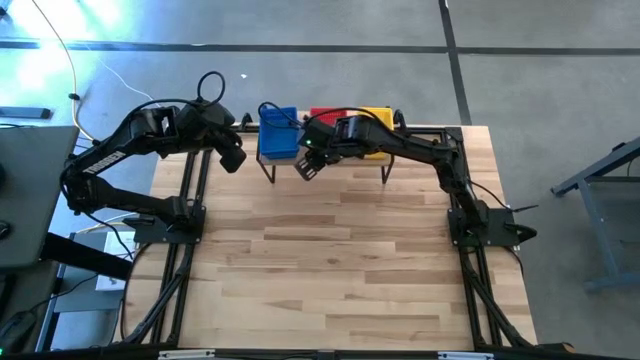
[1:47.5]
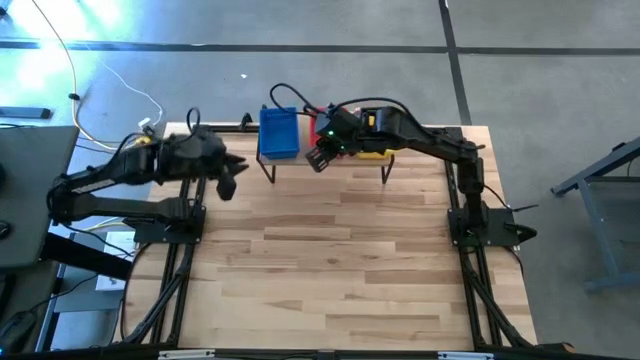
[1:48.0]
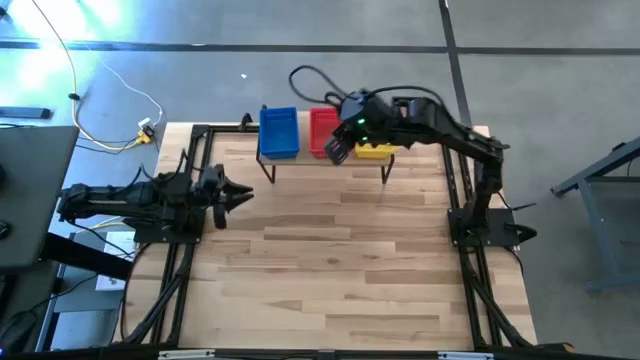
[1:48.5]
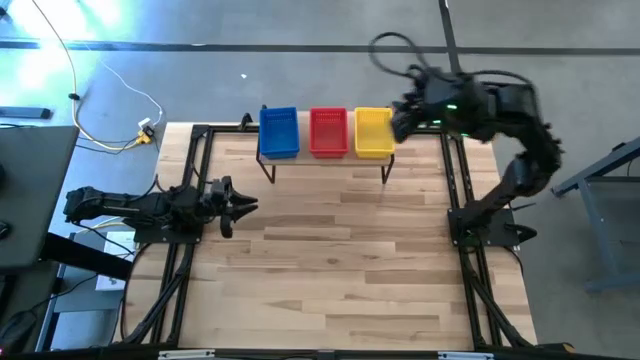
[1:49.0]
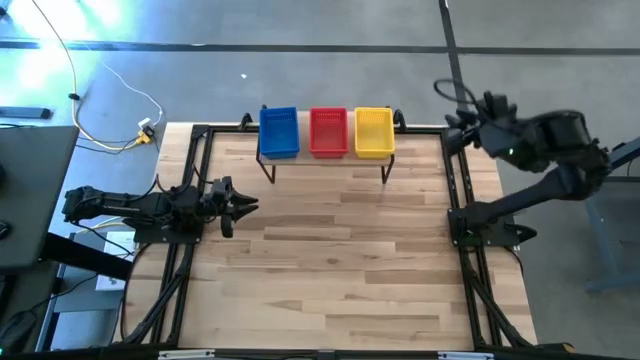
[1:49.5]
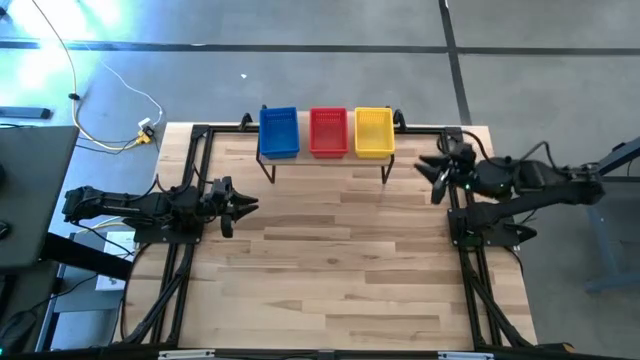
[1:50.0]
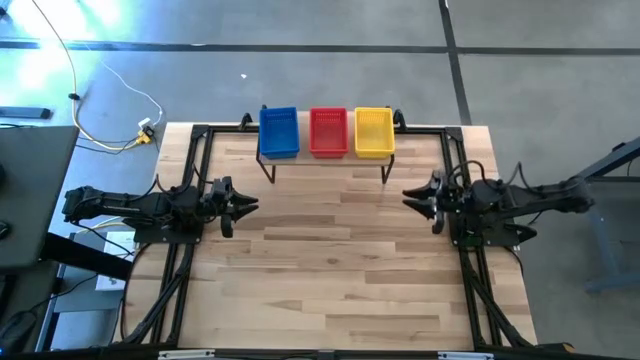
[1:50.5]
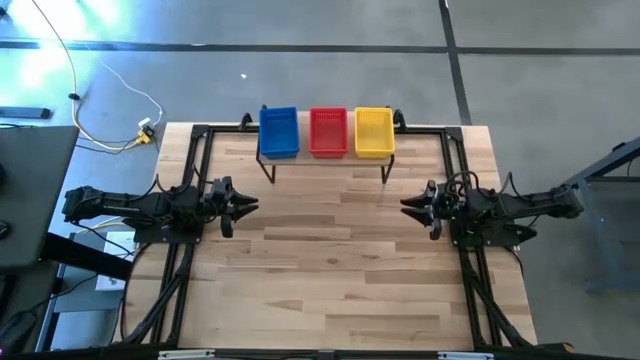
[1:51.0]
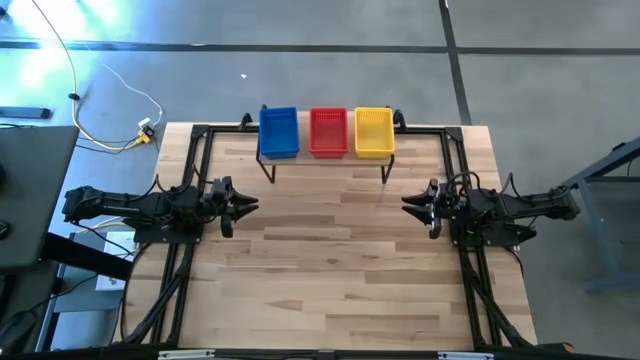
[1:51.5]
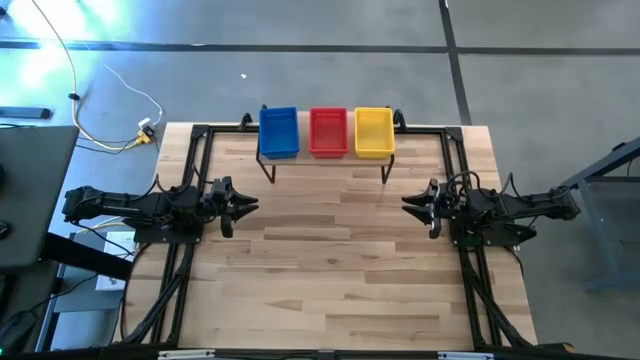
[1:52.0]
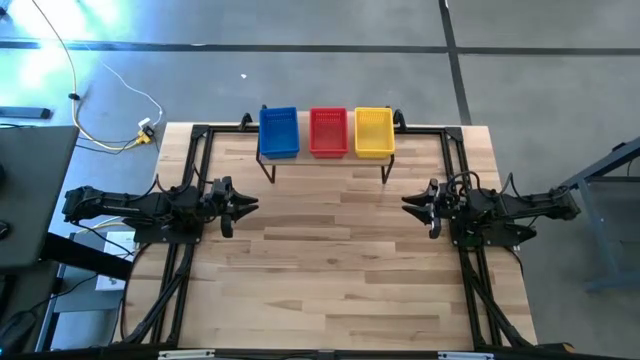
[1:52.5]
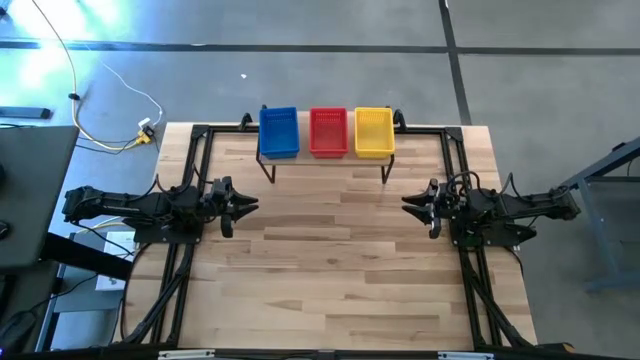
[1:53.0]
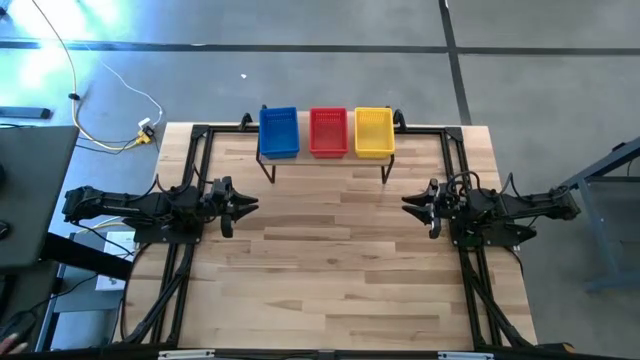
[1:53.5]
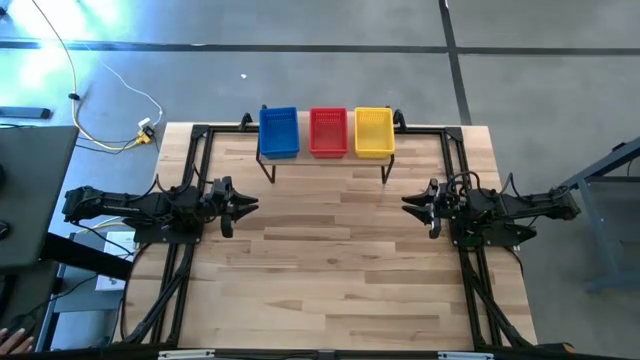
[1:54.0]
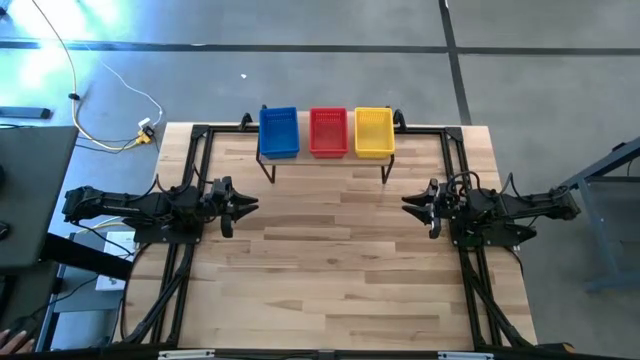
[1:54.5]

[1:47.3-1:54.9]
Task: Stack baskets on shelf by color
Return to Home Position
